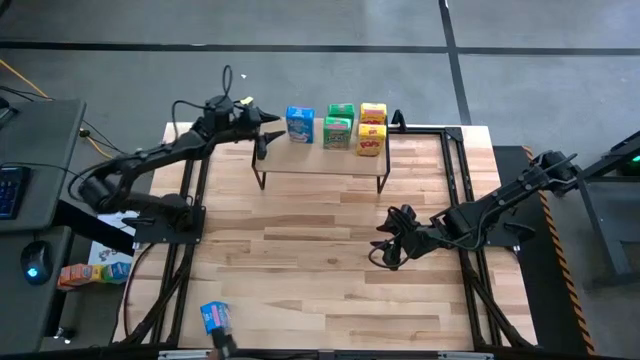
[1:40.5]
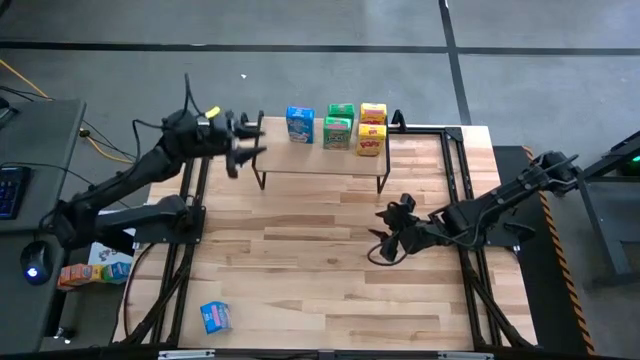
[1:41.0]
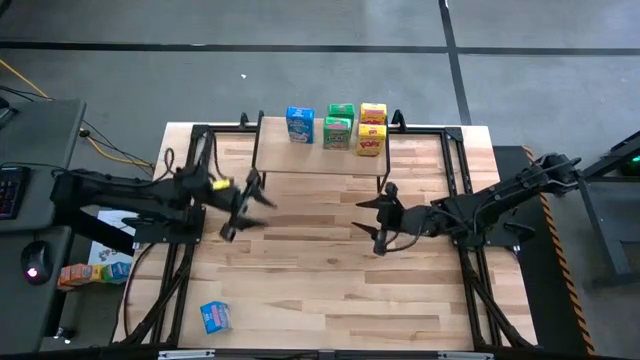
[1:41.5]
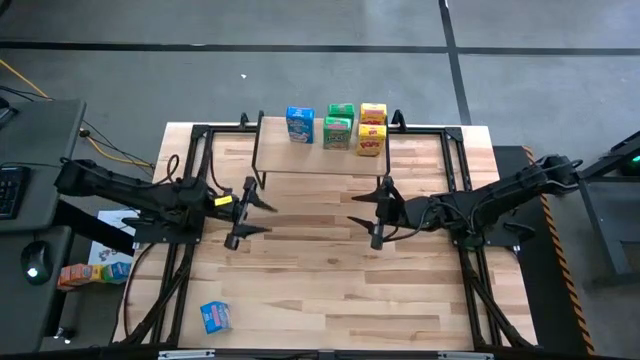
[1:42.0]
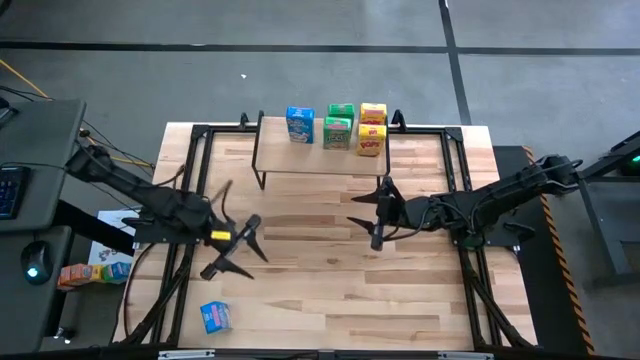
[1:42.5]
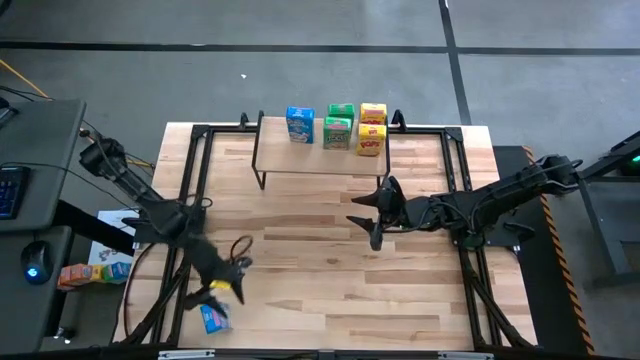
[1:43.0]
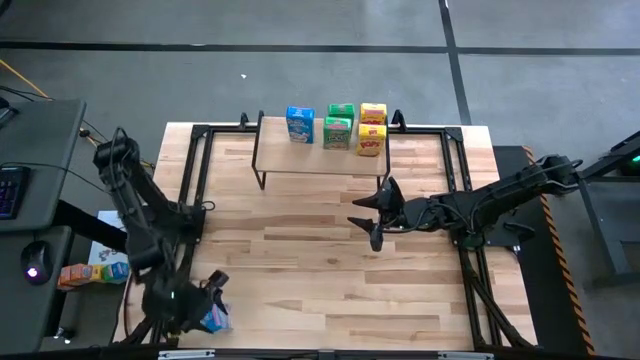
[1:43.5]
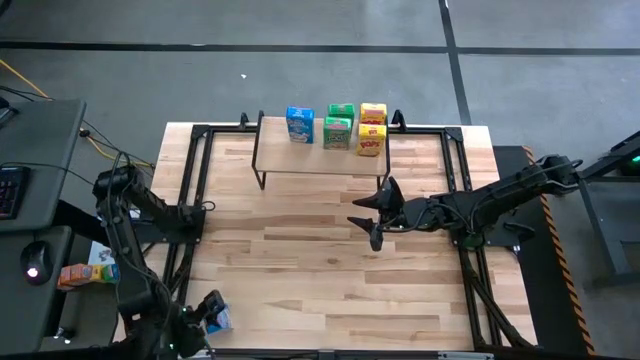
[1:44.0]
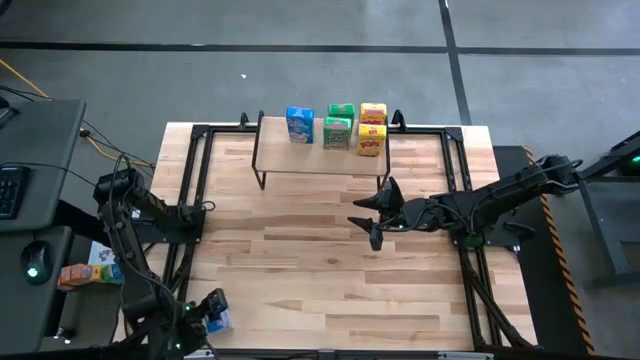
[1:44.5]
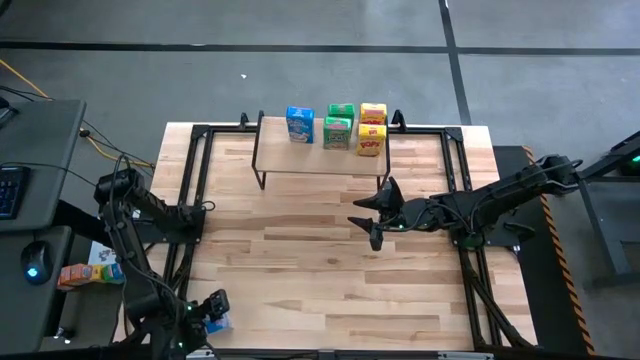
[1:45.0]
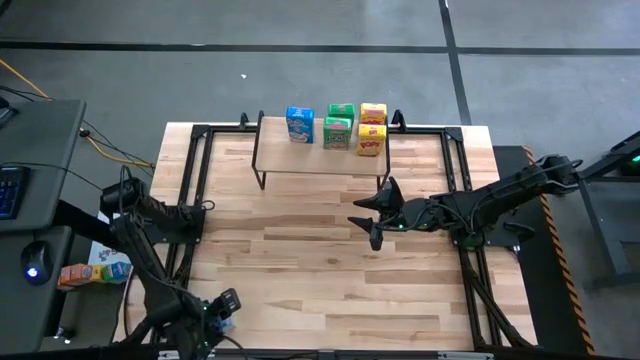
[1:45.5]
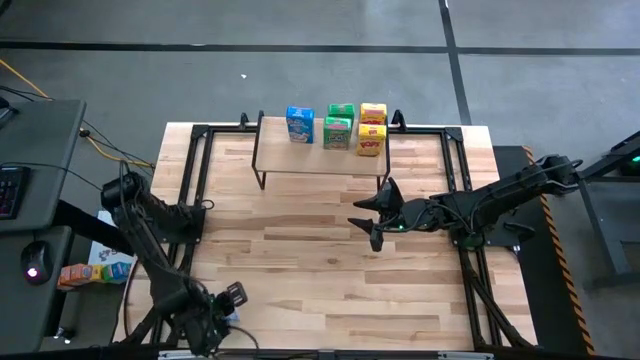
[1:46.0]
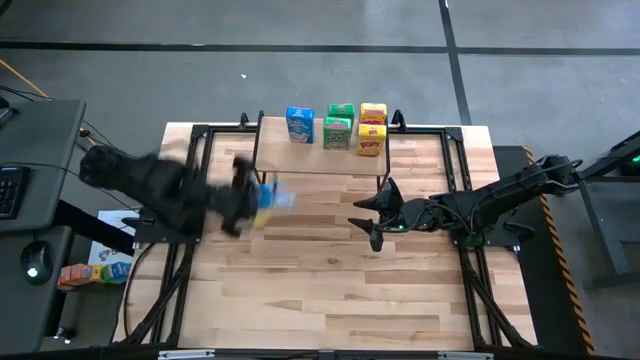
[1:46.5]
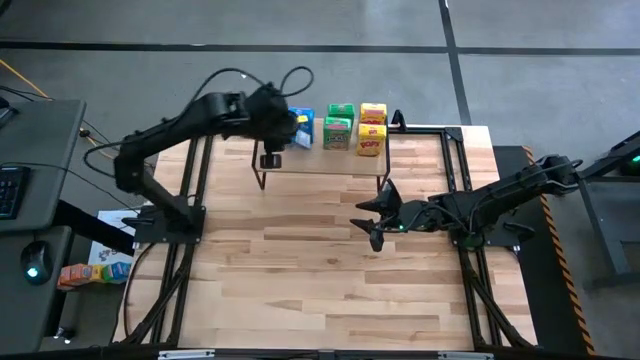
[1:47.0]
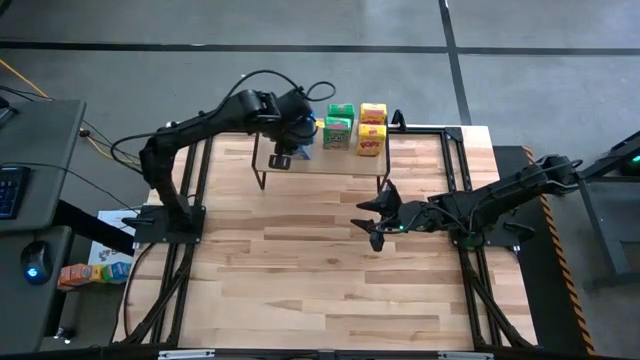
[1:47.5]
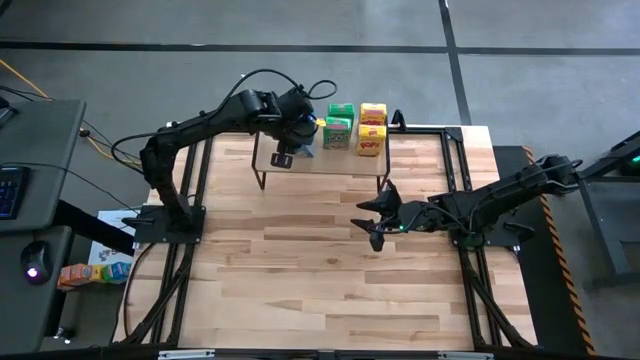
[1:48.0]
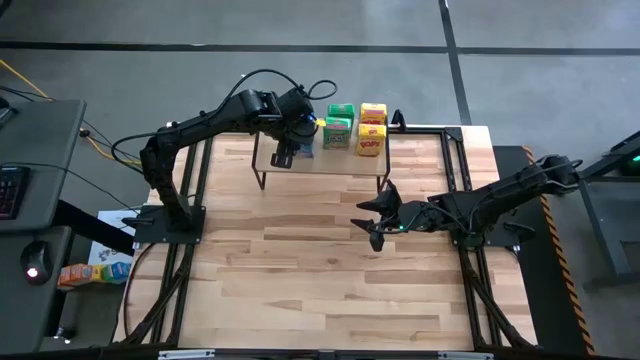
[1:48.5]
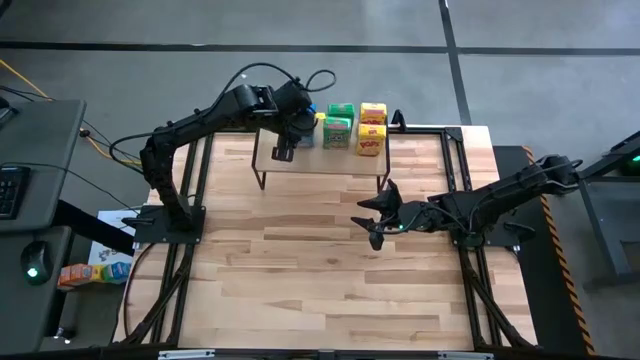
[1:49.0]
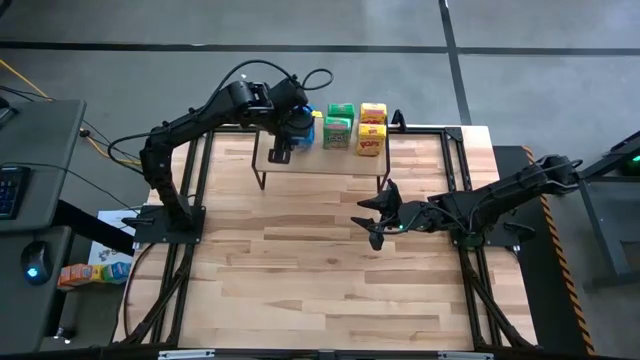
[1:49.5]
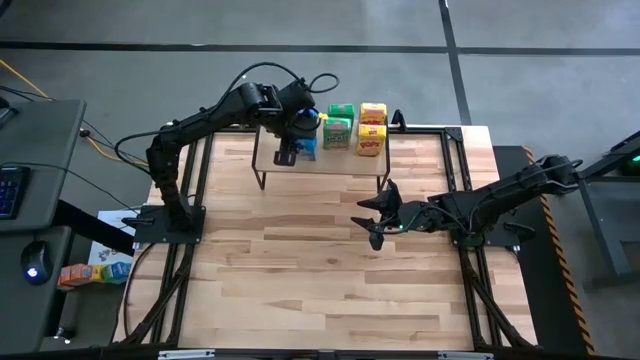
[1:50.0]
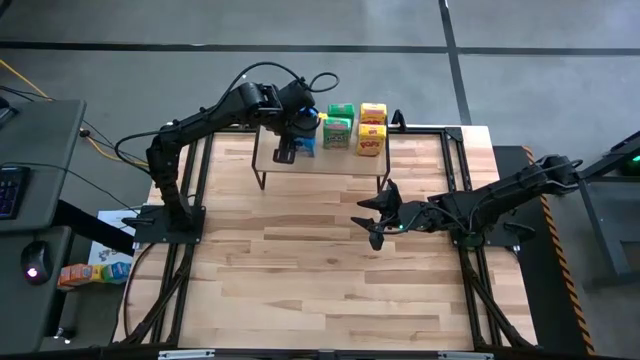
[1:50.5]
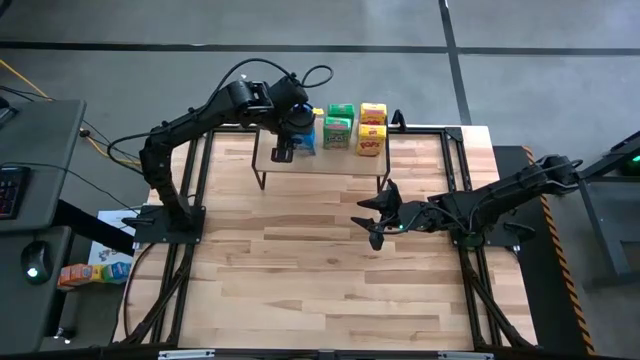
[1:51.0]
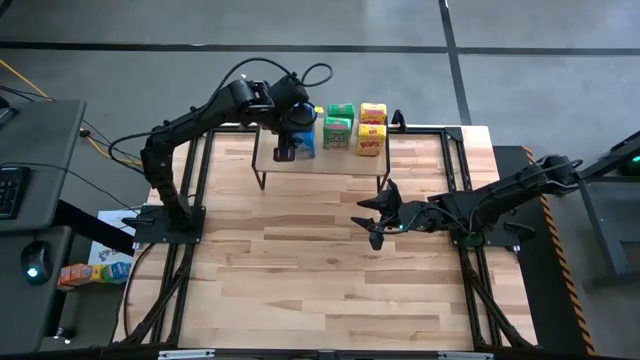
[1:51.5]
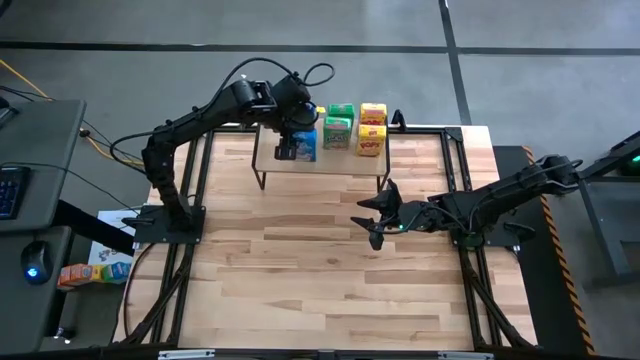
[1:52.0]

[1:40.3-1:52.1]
Task: Stack cereal on shelf
Put the blue cereal box on the shelf aligned with the other blue cereal box

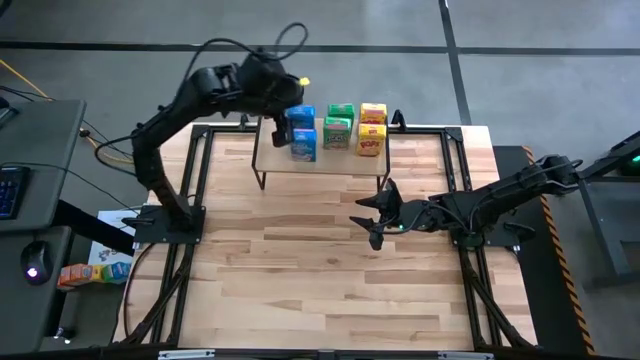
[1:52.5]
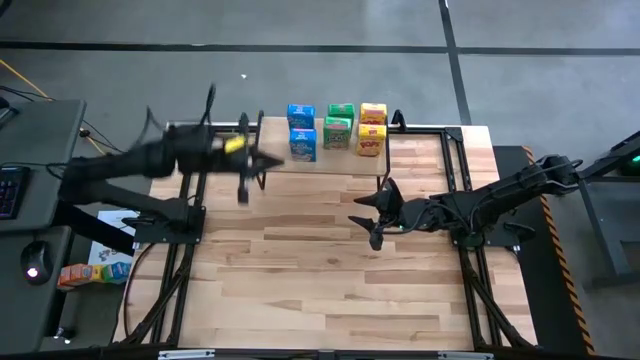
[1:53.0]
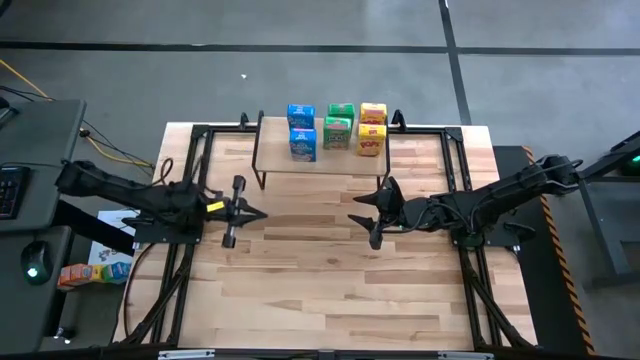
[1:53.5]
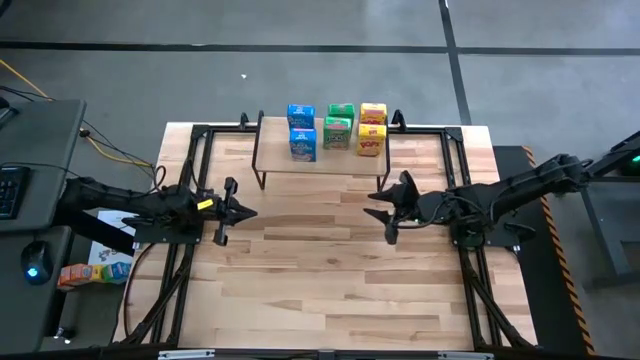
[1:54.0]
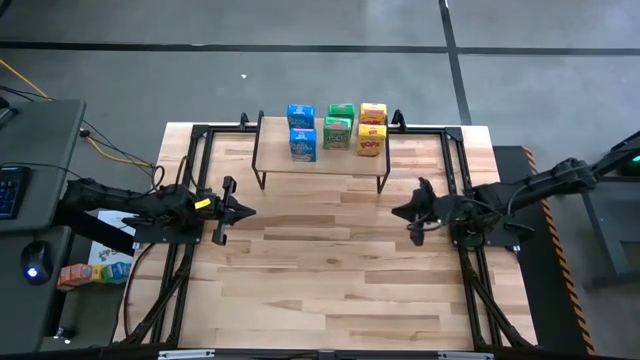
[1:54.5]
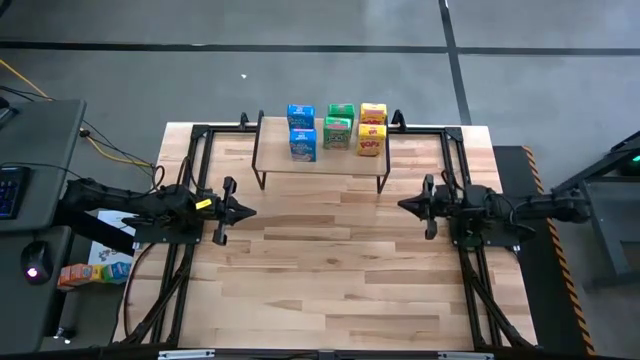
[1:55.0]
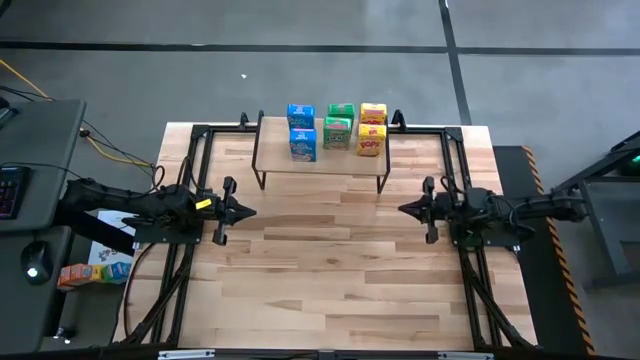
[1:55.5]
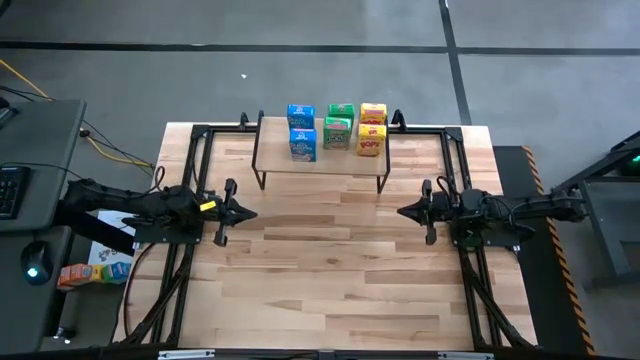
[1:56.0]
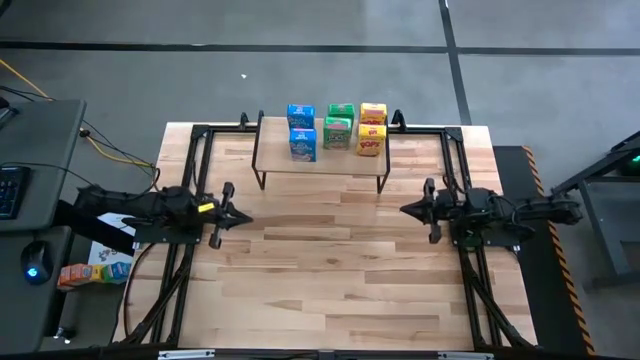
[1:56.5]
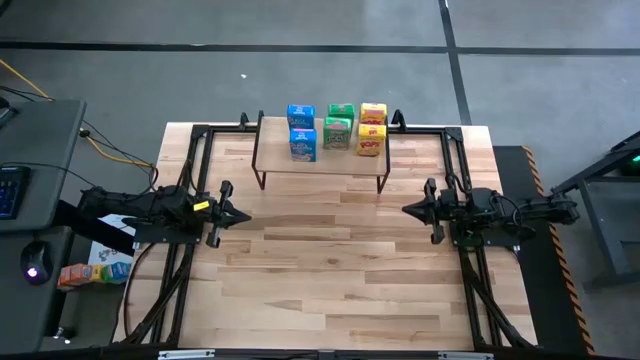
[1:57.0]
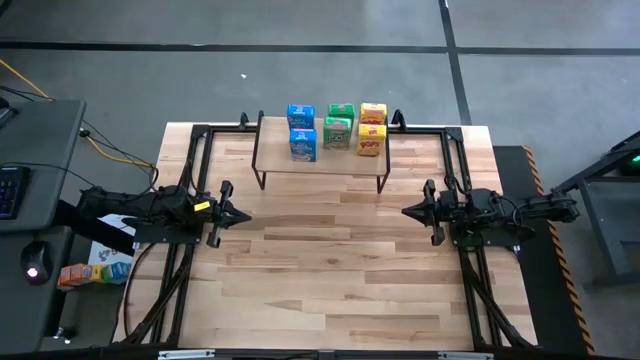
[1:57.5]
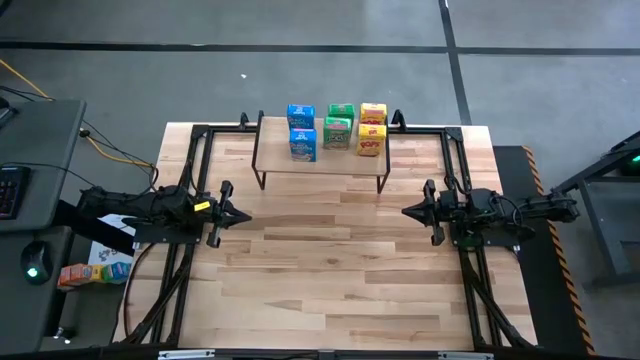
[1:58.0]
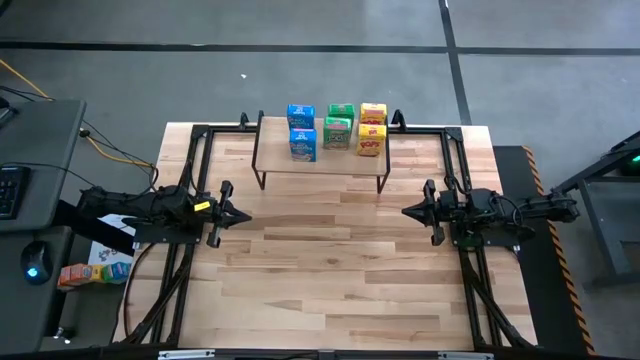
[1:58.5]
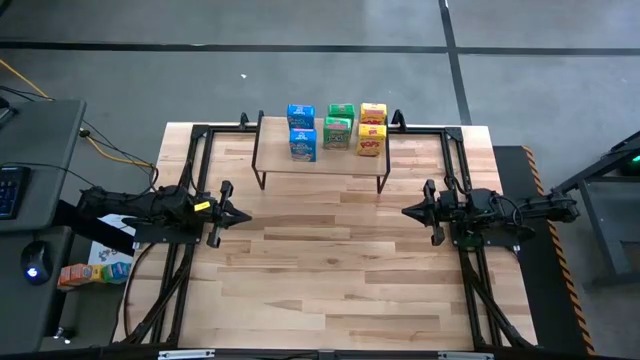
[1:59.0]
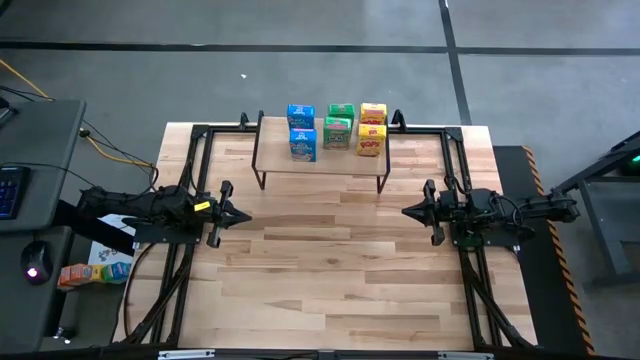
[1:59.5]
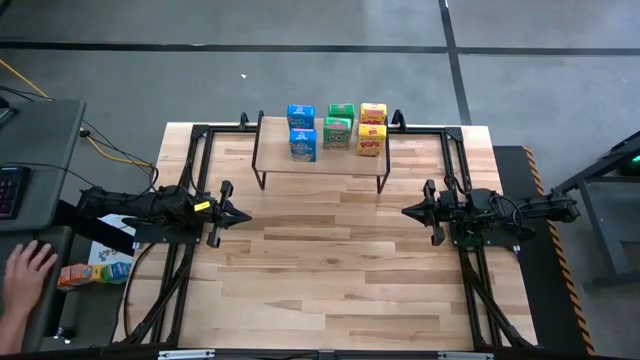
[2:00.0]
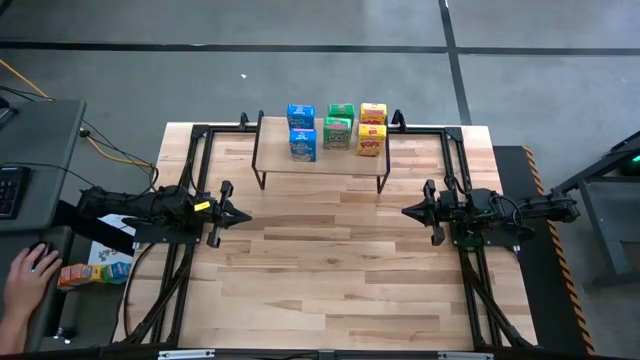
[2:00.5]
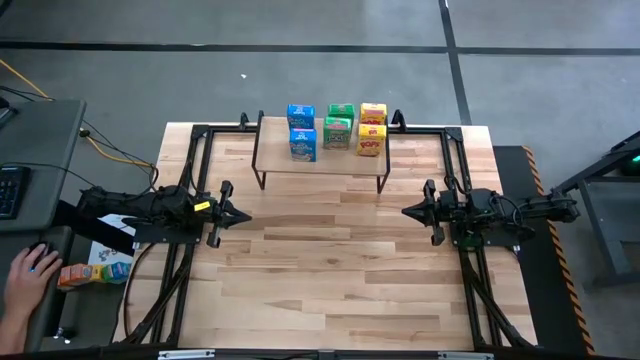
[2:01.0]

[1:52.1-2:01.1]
Return to Home Position

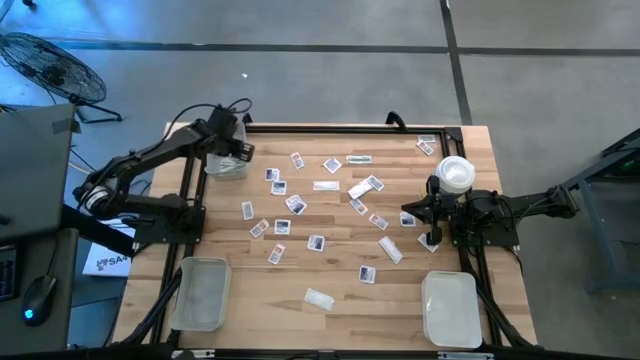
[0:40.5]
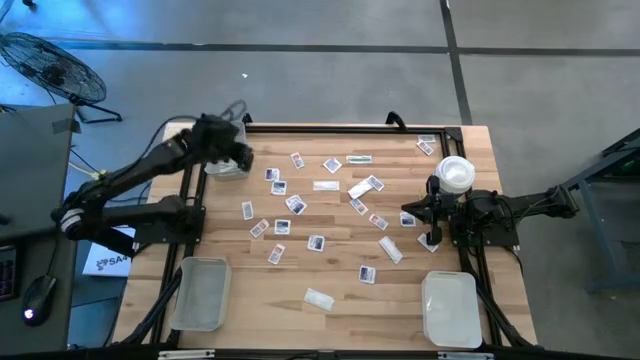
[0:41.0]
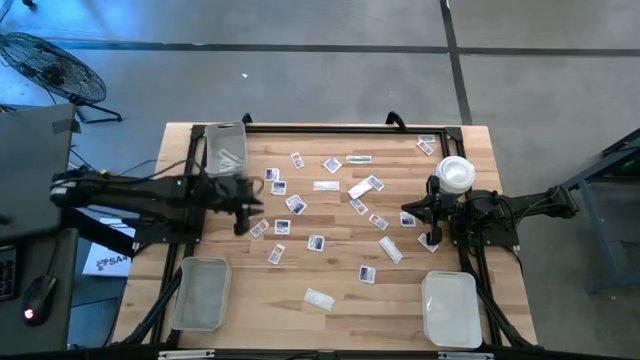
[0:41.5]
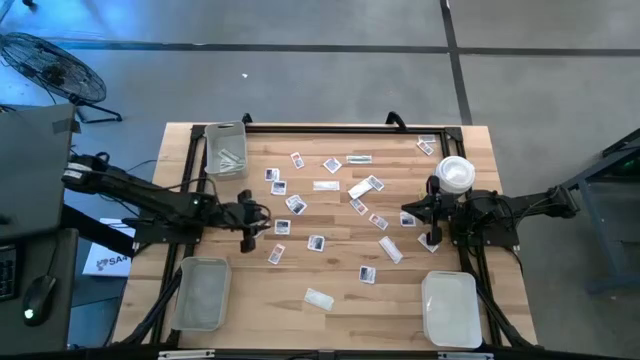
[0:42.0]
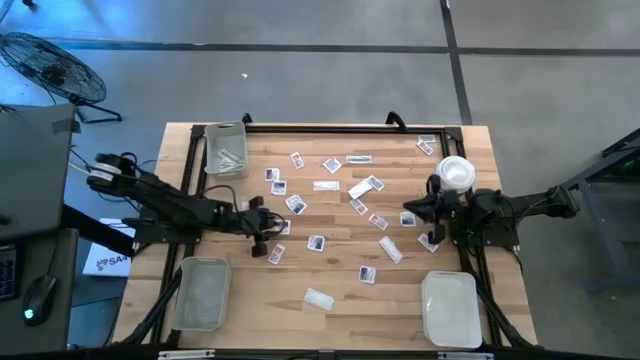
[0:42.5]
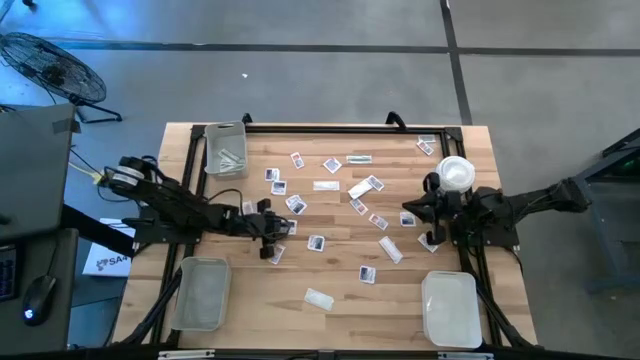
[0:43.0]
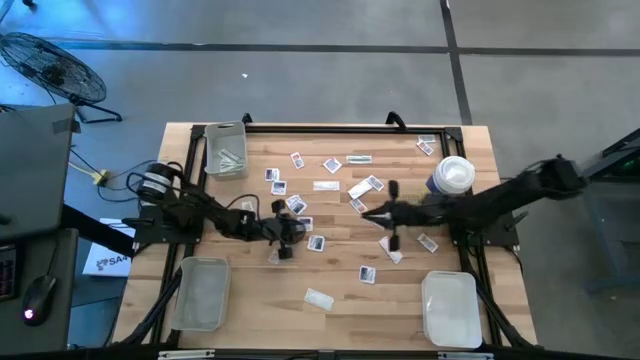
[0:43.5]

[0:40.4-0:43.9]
Task: Pick & Place First Aid Supplies
Adjust the blue alcohol pad on the table
